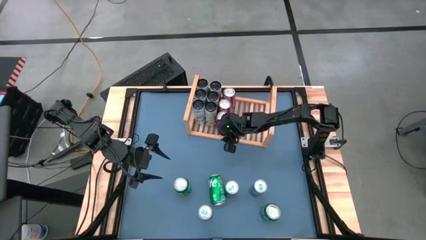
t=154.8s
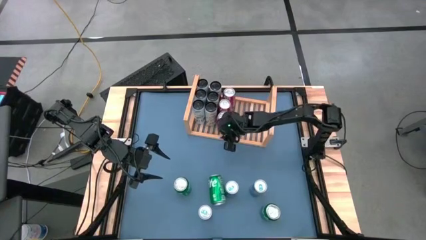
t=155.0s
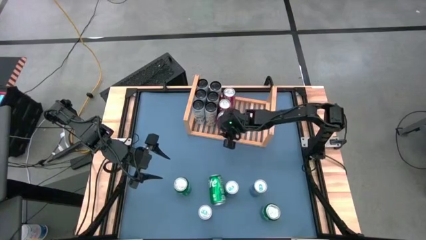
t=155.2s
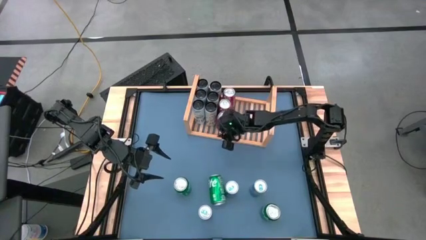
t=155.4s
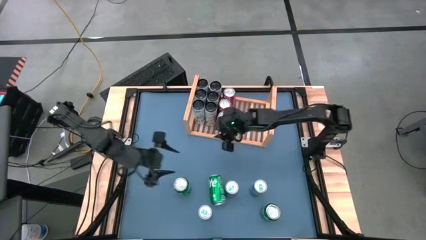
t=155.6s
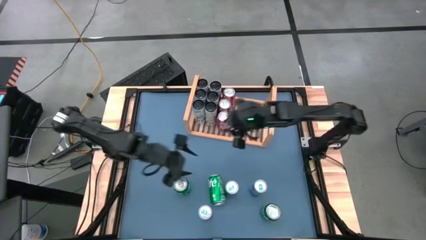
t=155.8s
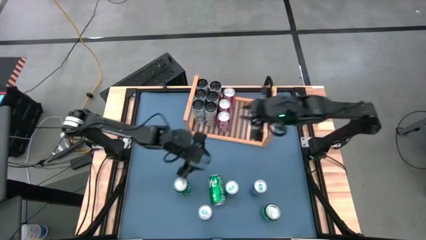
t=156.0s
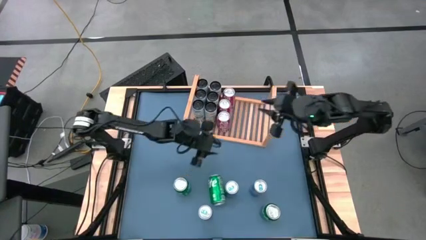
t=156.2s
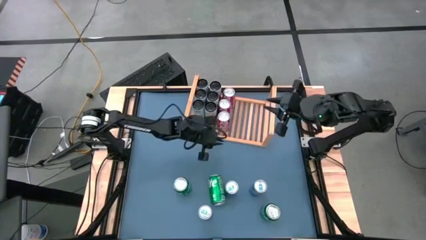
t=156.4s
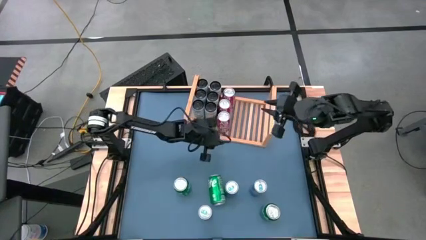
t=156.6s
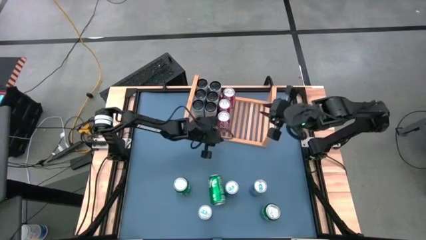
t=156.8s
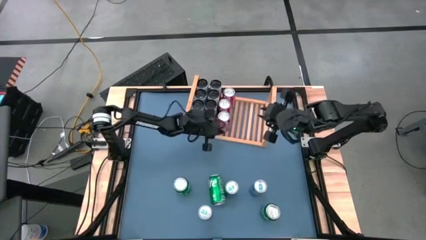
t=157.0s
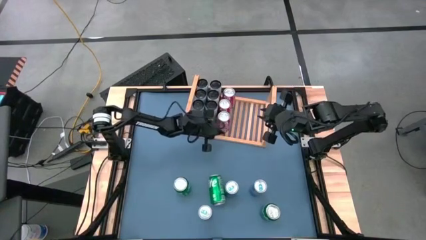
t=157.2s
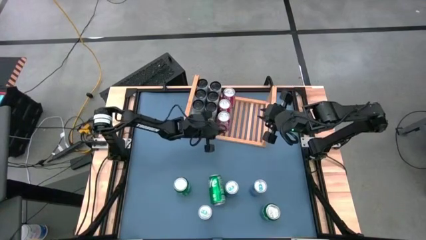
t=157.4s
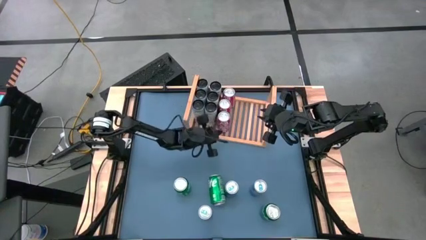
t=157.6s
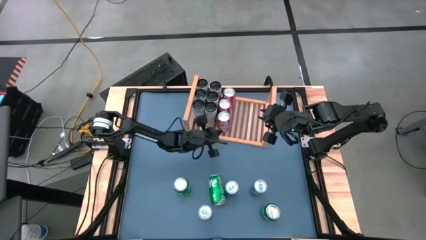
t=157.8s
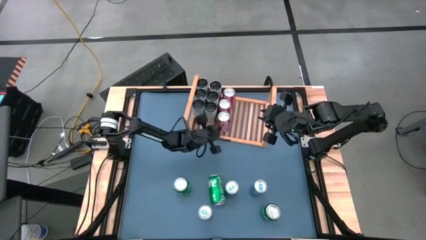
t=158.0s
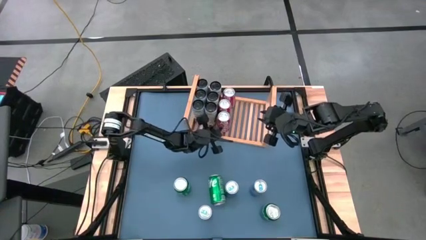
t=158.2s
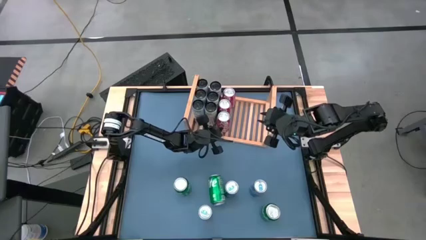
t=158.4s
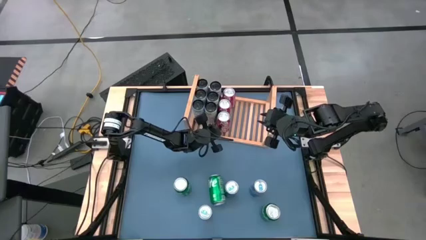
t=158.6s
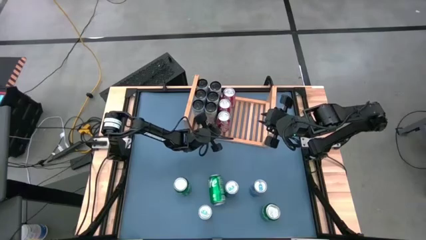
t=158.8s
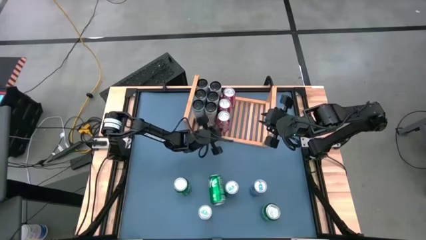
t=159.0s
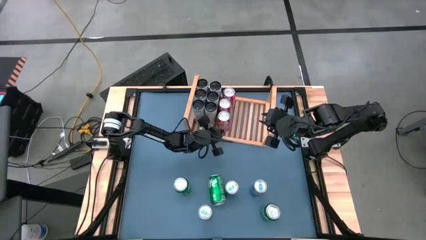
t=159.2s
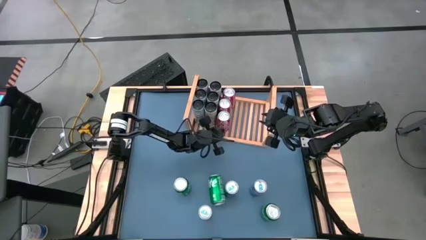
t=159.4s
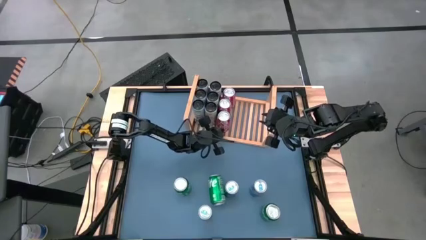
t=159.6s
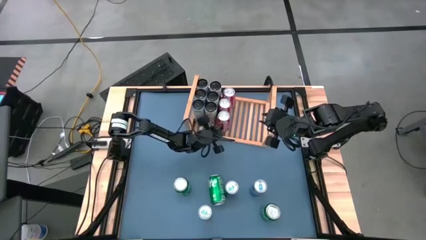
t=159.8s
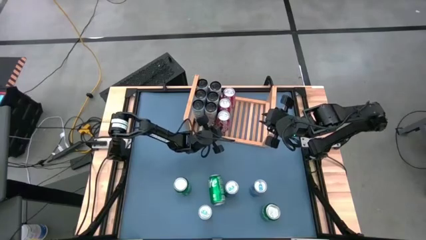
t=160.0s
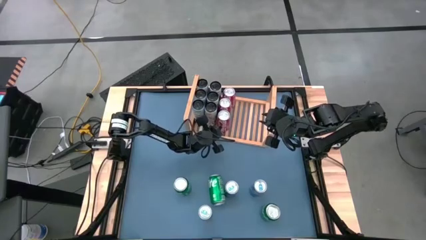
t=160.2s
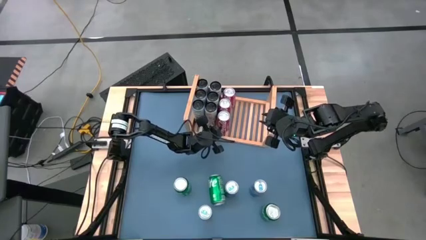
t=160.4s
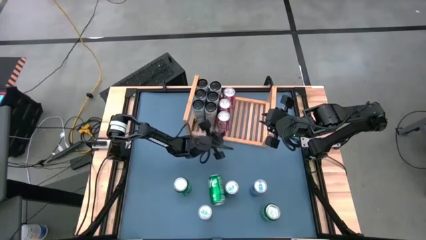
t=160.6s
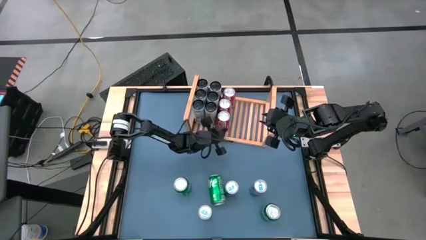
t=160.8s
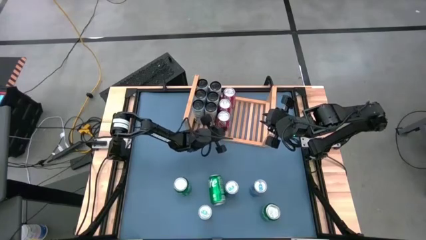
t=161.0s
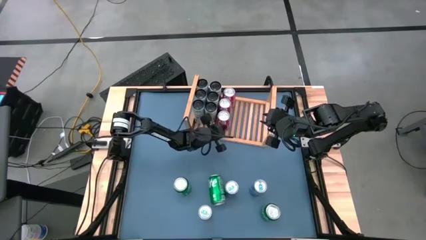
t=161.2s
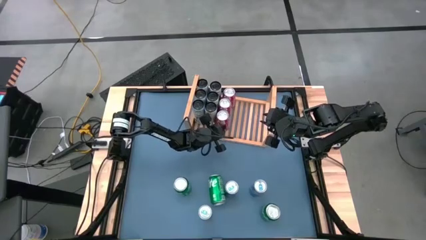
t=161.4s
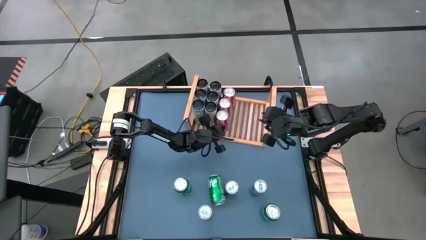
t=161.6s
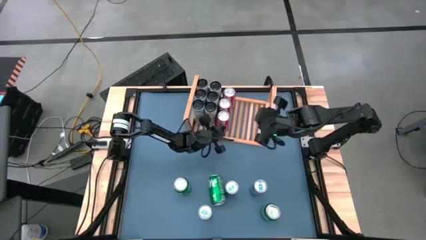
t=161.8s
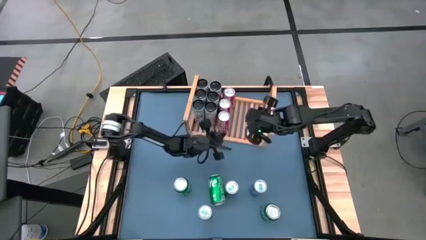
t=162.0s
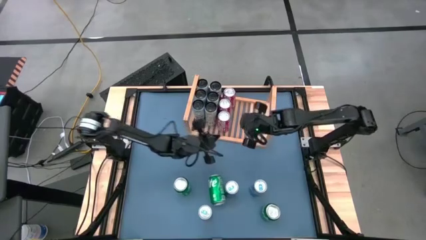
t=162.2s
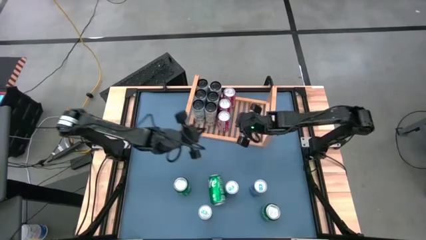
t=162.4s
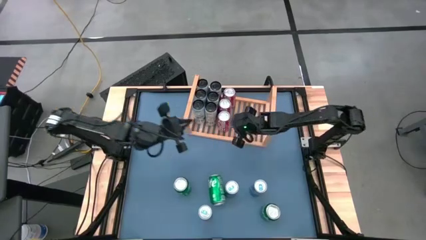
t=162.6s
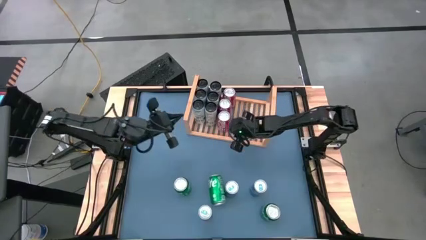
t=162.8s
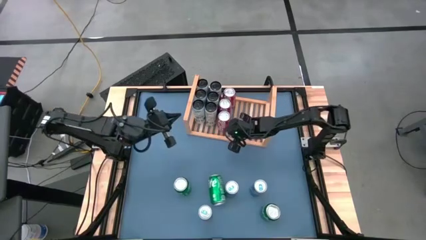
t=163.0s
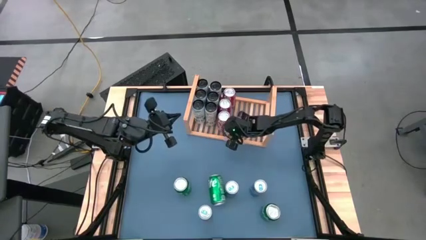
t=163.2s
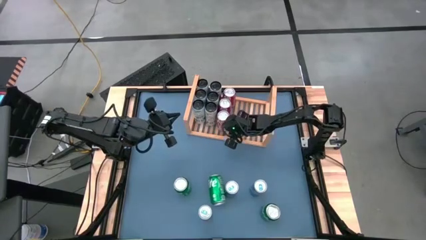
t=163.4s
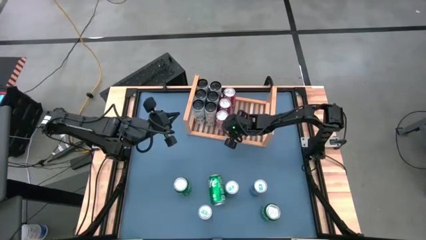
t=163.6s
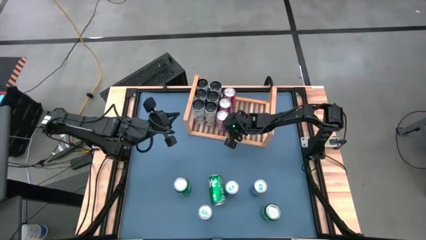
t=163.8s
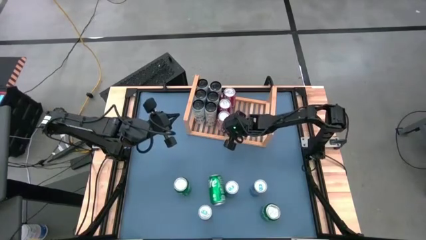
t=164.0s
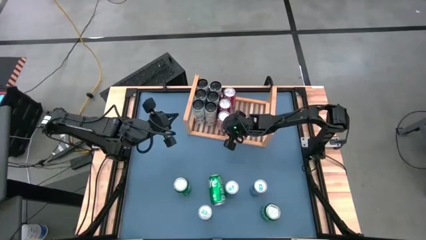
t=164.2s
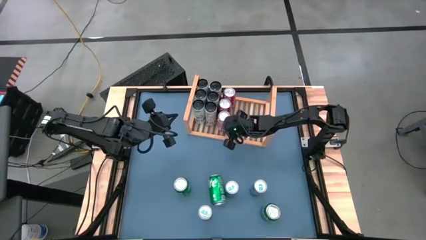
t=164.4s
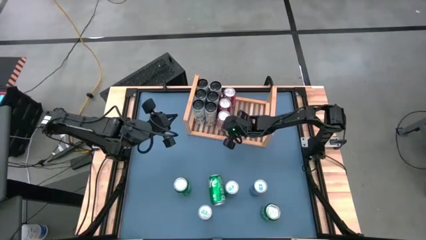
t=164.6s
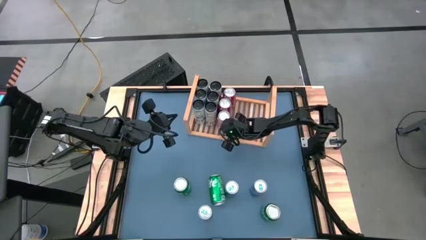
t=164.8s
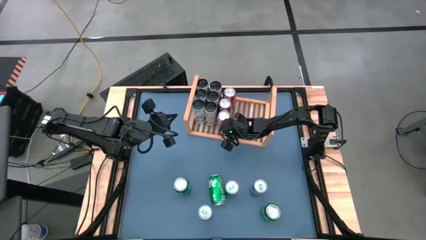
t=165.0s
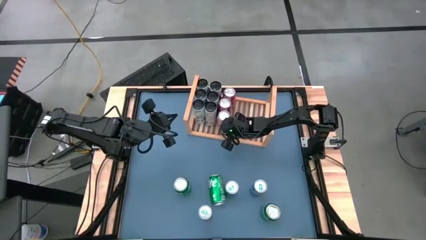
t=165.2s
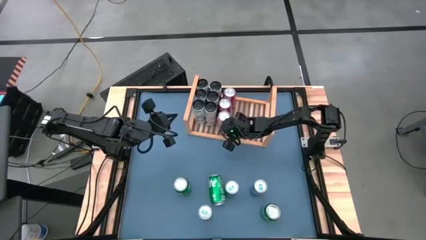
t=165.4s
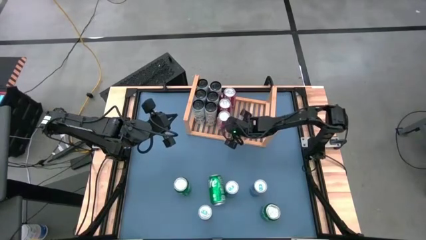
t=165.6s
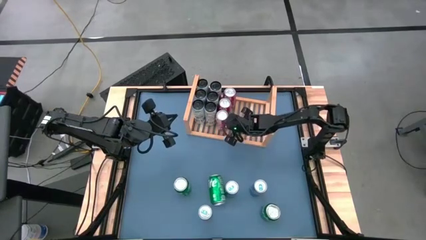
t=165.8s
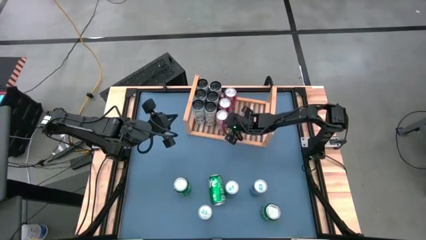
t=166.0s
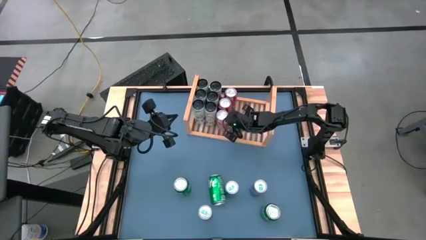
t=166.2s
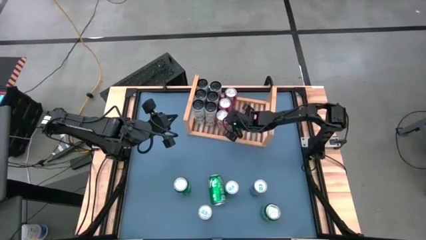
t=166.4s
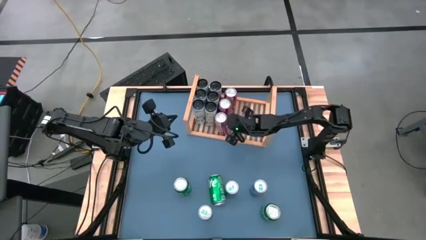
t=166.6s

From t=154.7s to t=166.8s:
Task: Place canned beverage on shelf
Put the red soda can on the shelf aligned with the other red soda can

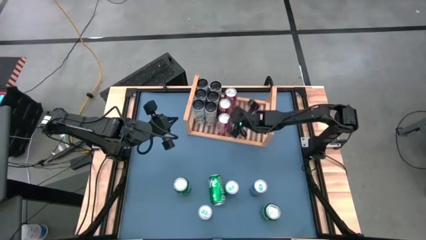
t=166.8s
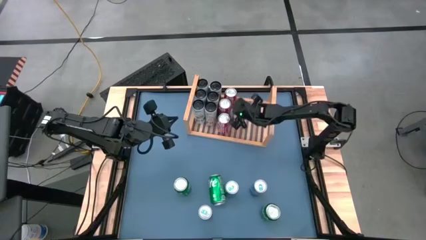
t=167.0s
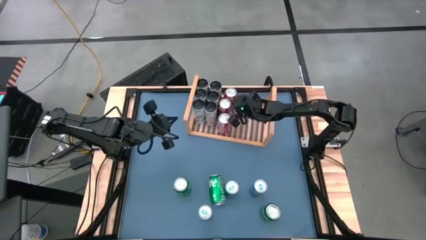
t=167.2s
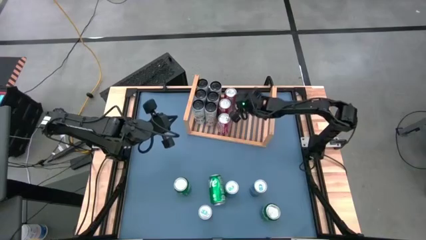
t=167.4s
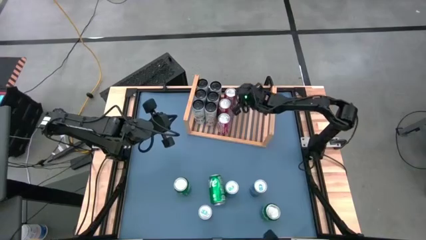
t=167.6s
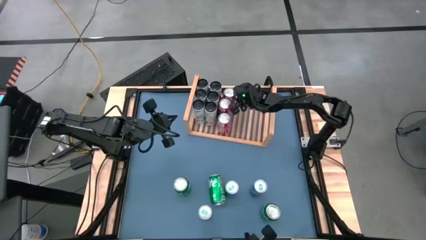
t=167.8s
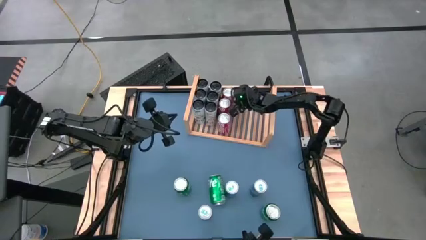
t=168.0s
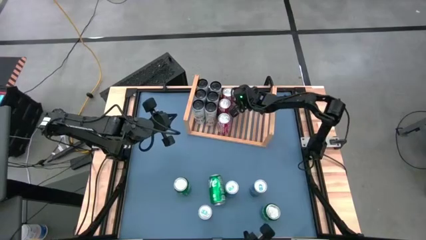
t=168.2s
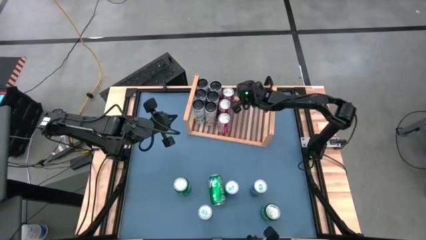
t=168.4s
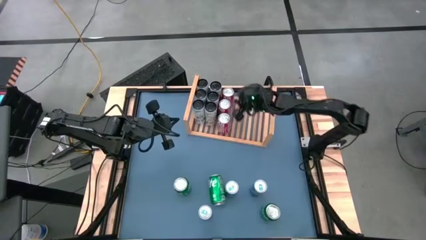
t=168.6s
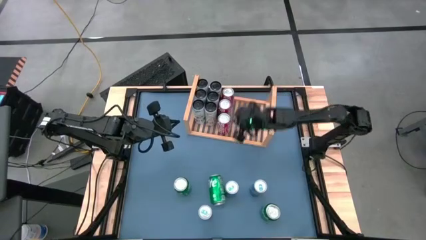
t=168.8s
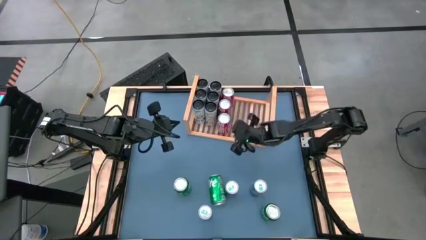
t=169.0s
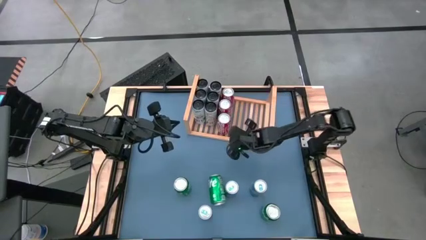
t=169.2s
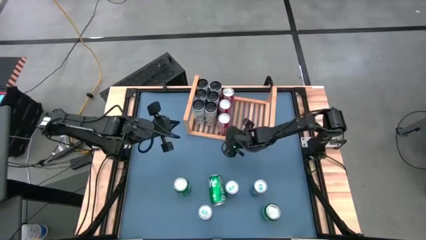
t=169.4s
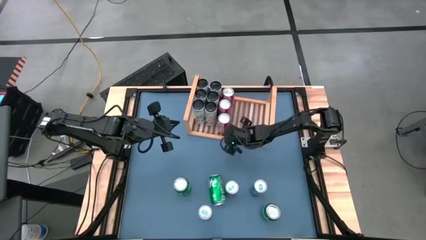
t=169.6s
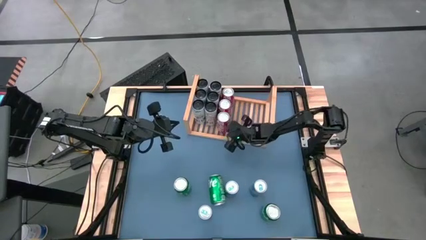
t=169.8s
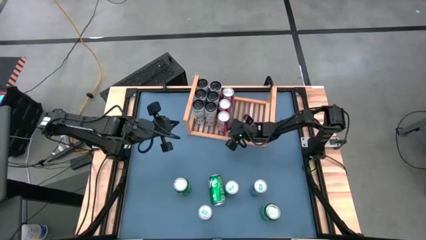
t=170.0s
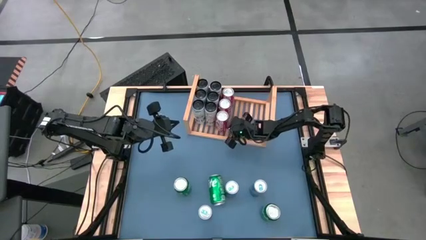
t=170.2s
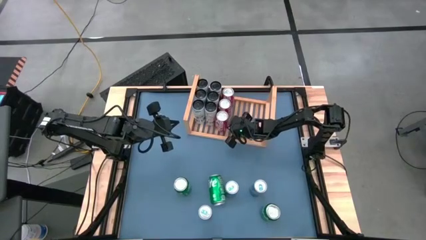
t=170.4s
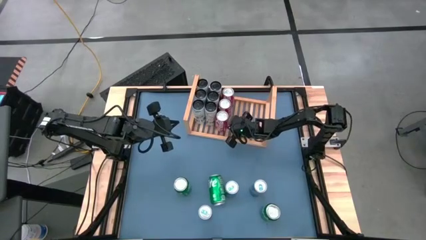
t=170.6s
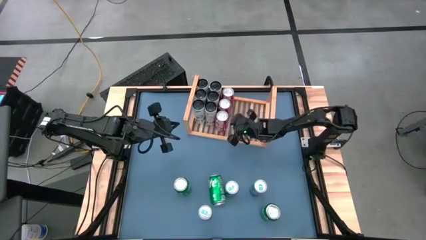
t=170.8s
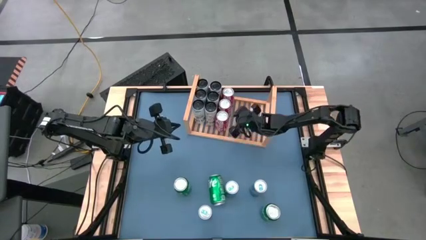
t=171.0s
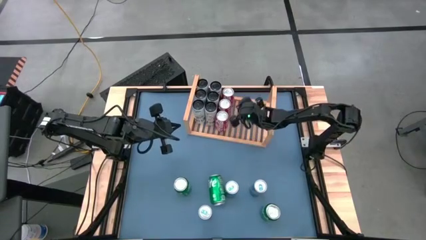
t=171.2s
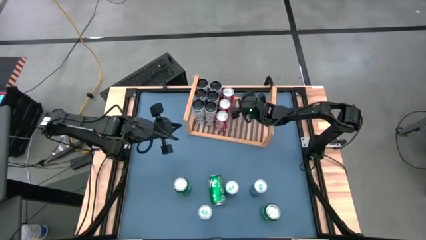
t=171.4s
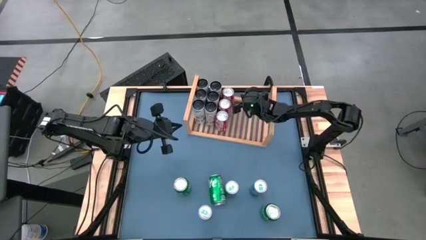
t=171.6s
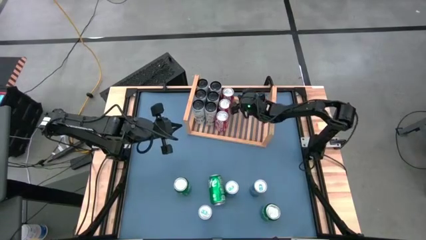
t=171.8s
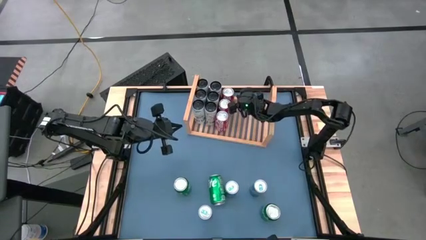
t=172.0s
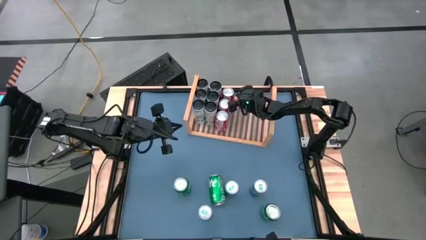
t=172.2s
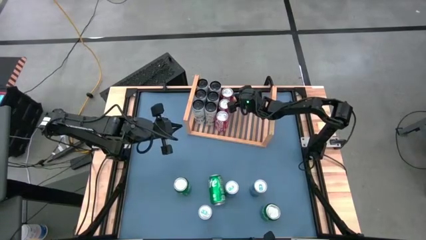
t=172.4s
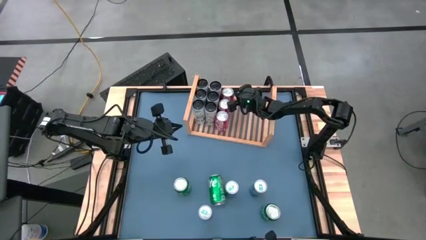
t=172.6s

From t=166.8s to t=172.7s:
Adjust the red soda cans on the shelf
